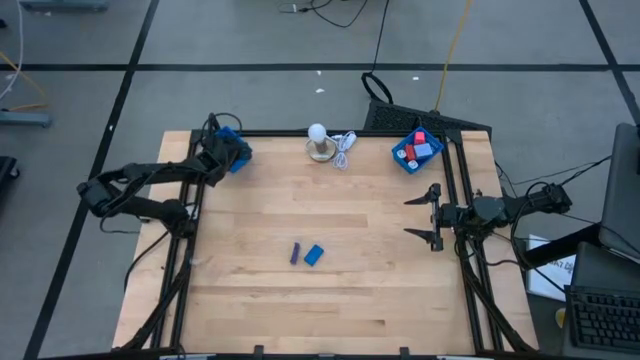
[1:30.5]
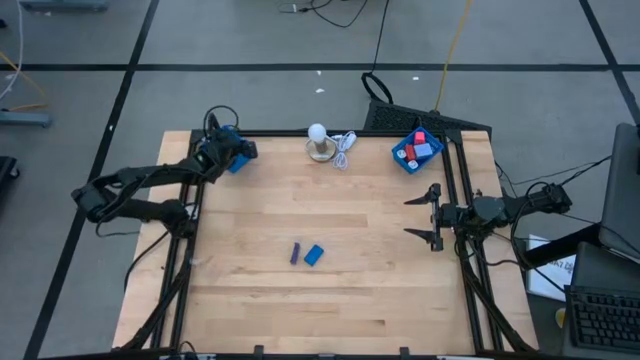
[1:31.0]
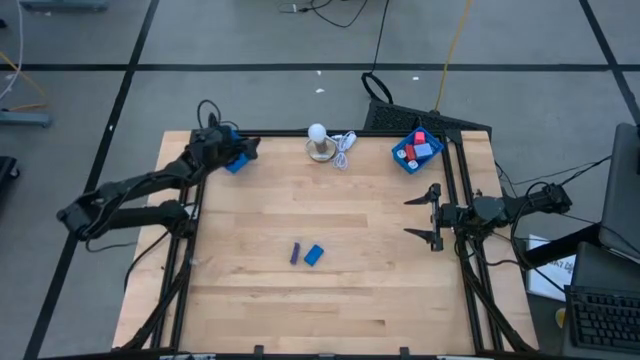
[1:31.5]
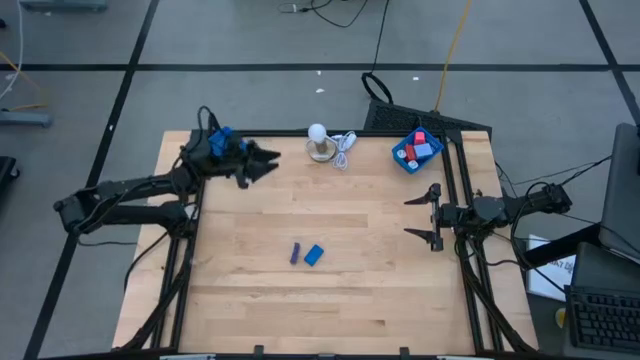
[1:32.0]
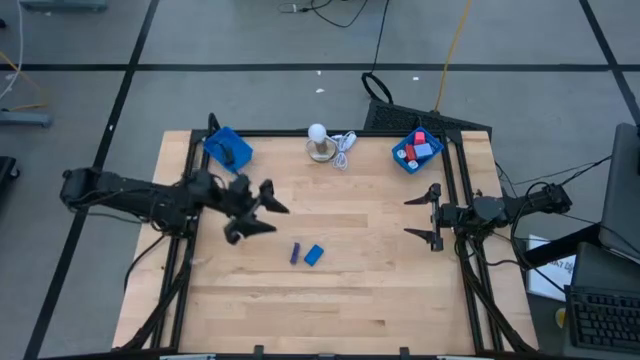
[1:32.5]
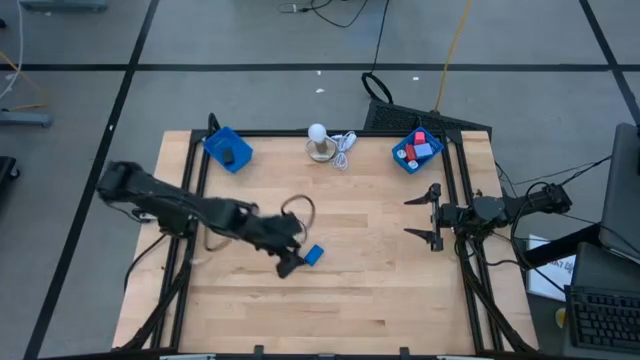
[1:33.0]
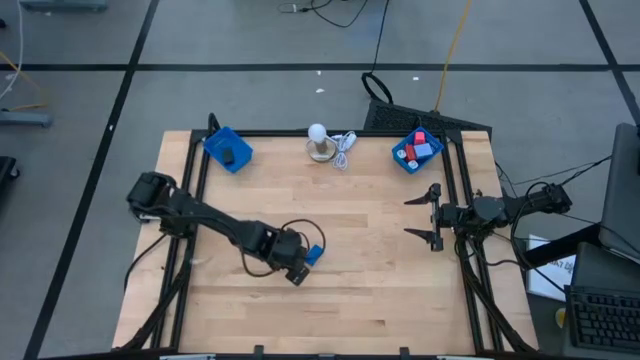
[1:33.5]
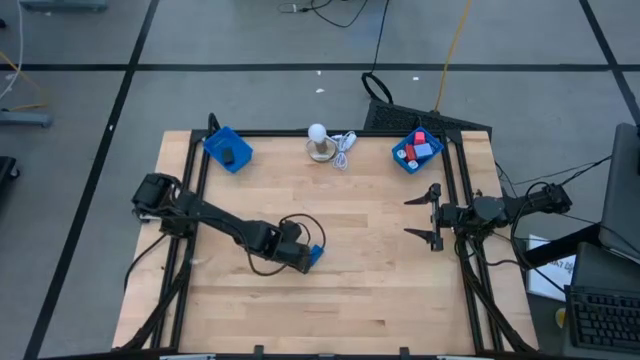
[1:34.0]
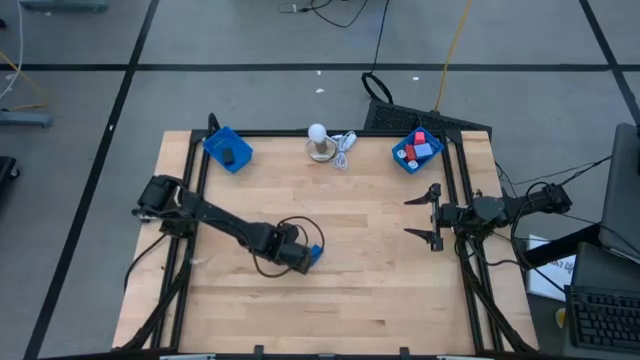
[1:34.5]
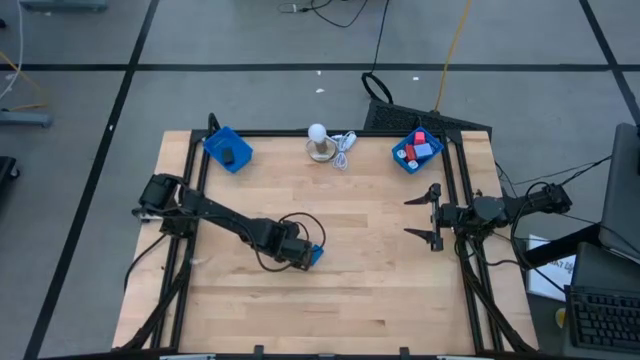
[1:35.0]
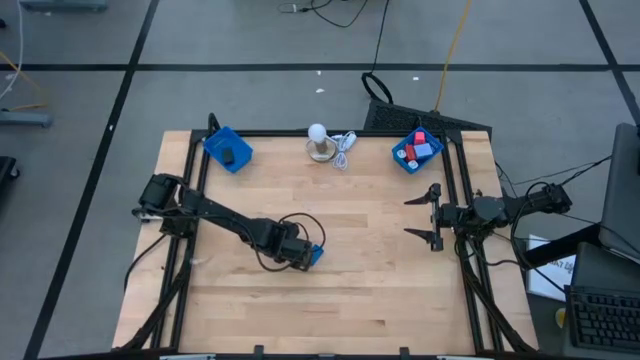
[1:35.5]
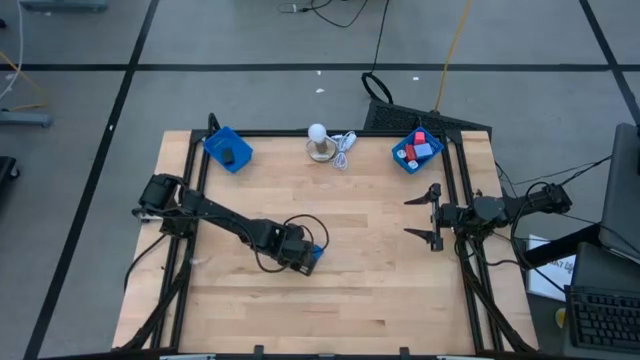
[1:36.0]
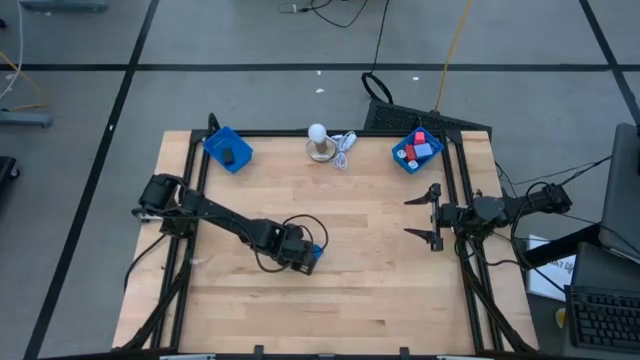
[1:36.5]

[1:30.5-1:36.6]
Task: Pick & Place Office items
Put the dark blue digital timer into the left blue bin

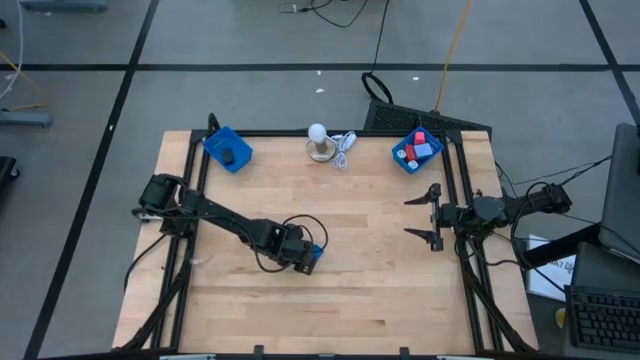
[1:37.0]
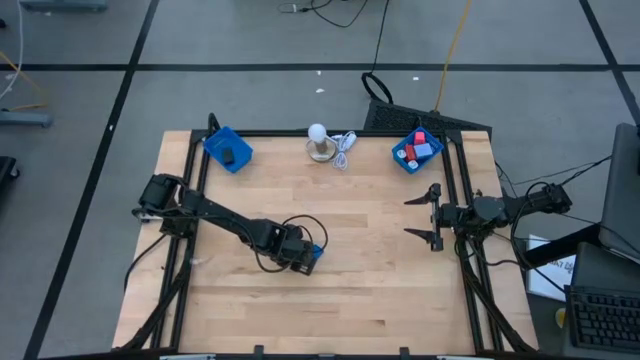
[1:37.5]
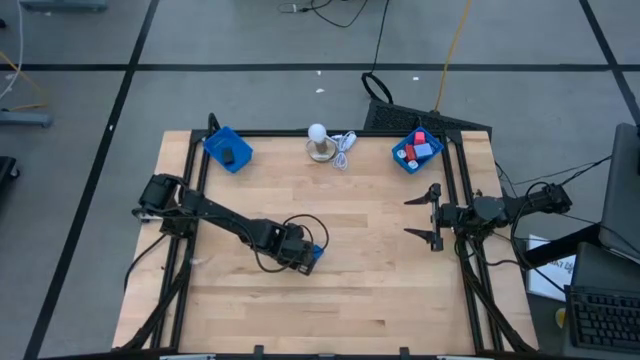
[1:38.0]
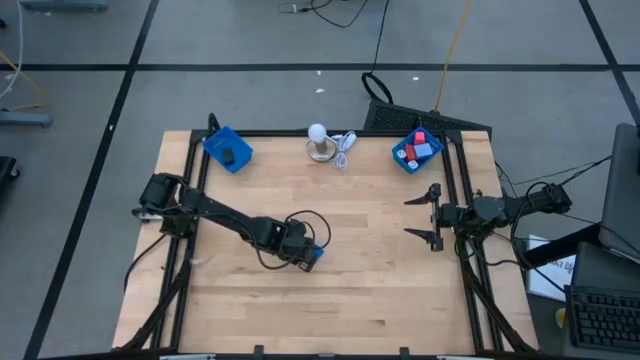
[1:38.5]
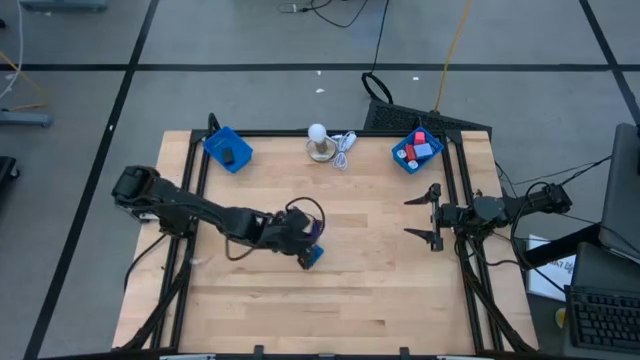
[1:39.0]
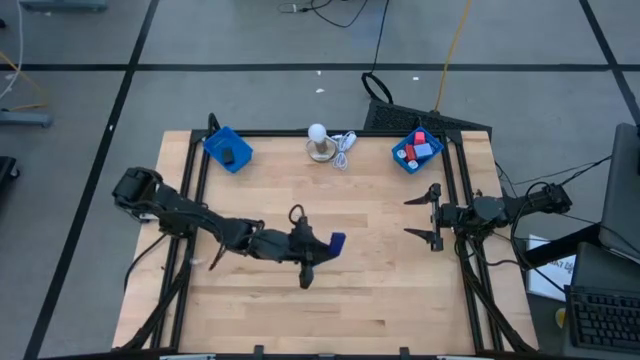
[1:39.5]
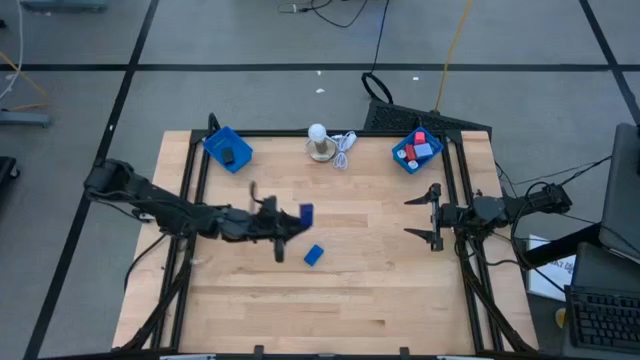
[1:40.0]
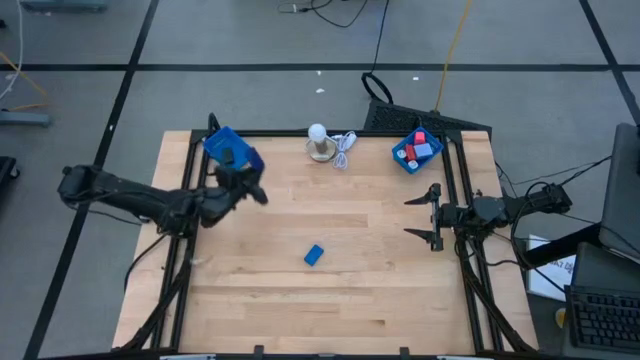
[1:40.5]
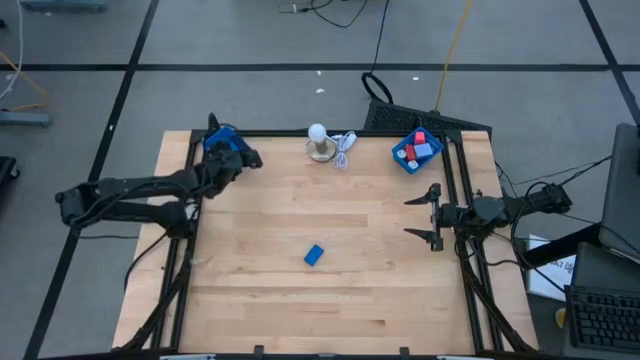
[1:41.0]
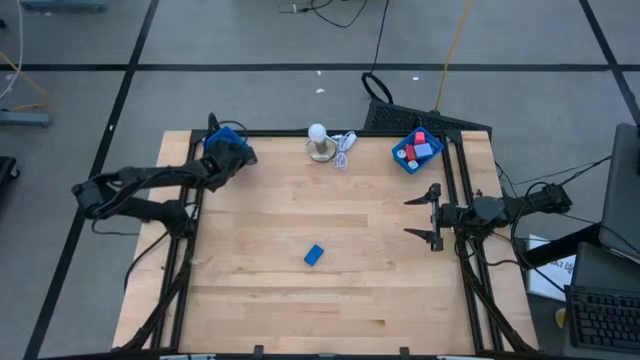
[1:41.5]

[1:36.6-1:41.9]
Put the dark blue digital timer into the left blue bin

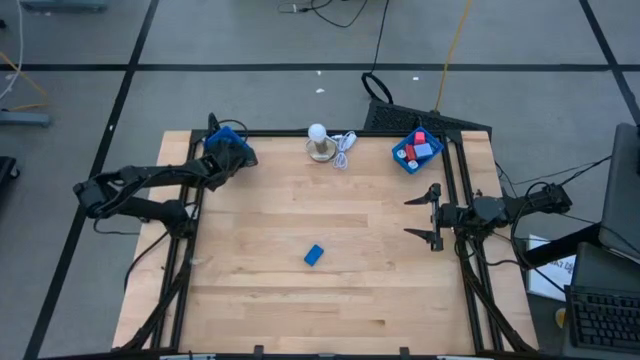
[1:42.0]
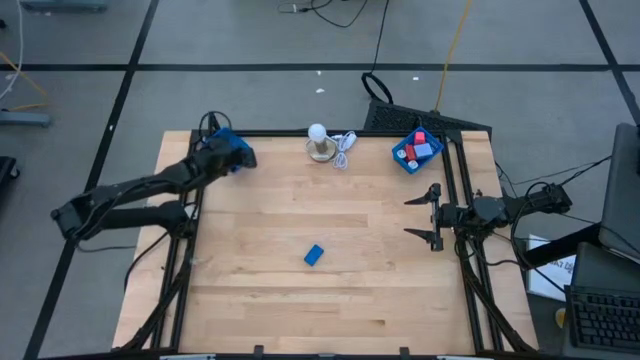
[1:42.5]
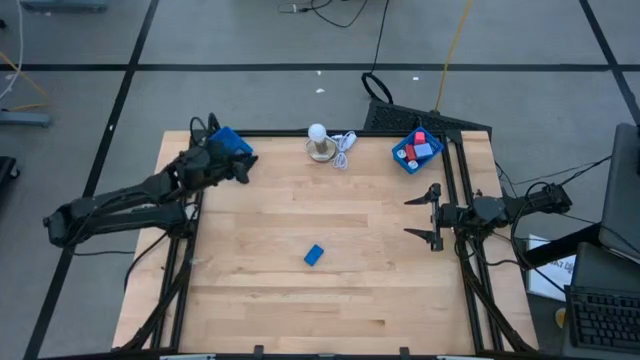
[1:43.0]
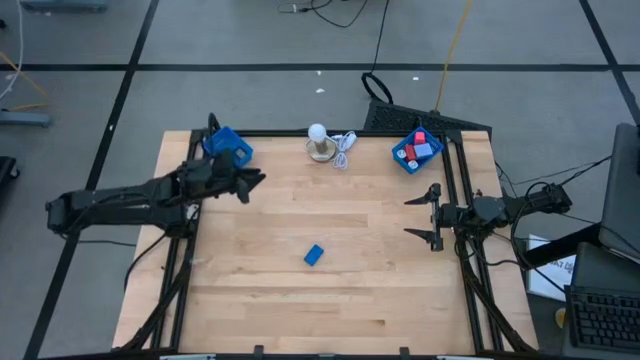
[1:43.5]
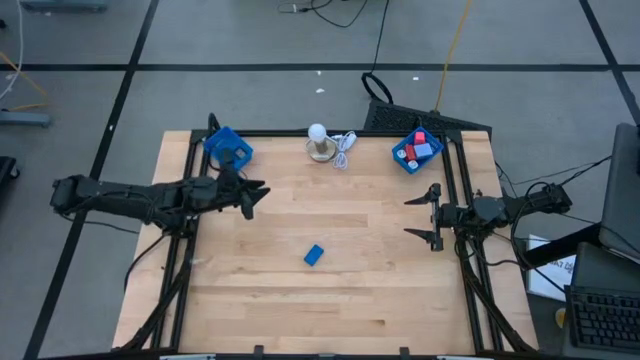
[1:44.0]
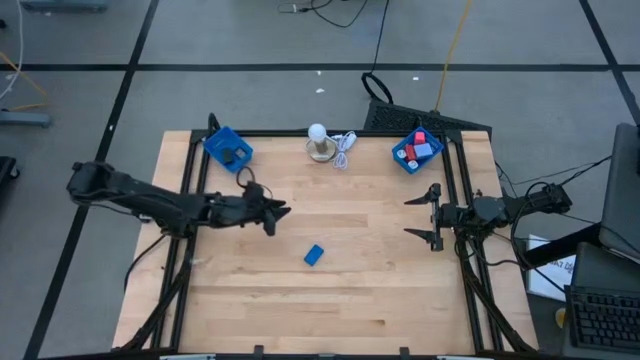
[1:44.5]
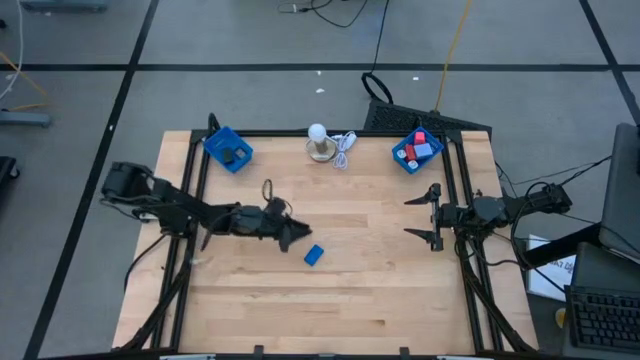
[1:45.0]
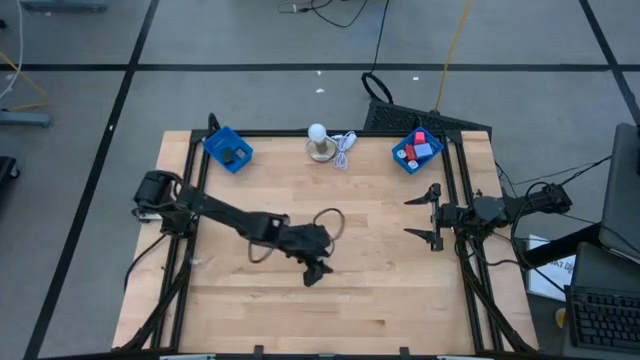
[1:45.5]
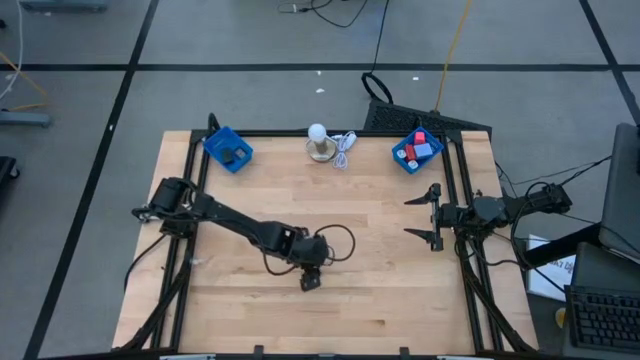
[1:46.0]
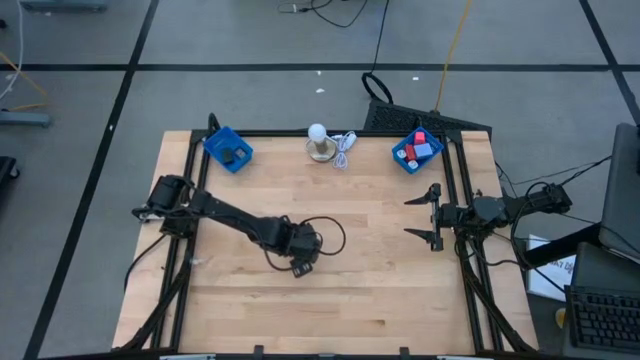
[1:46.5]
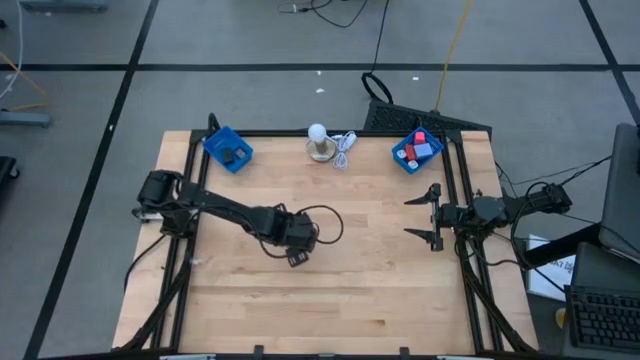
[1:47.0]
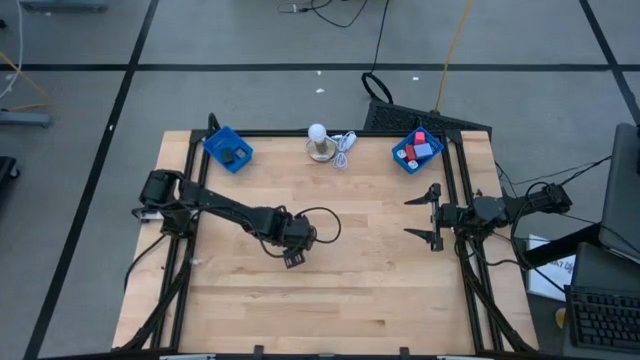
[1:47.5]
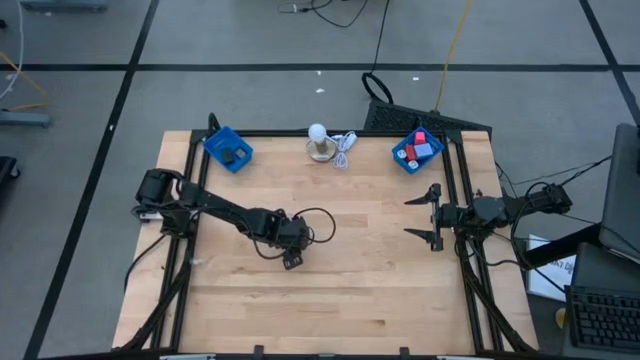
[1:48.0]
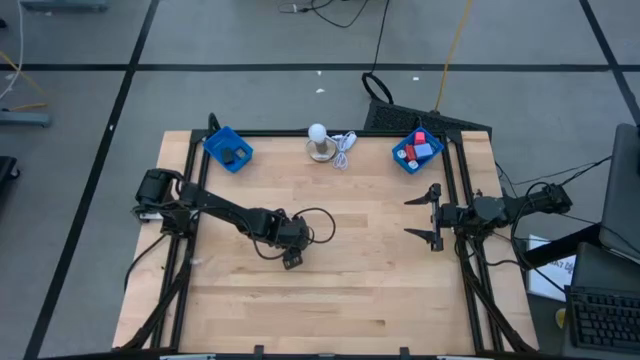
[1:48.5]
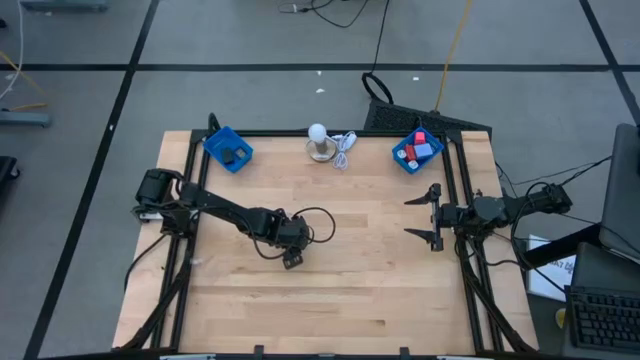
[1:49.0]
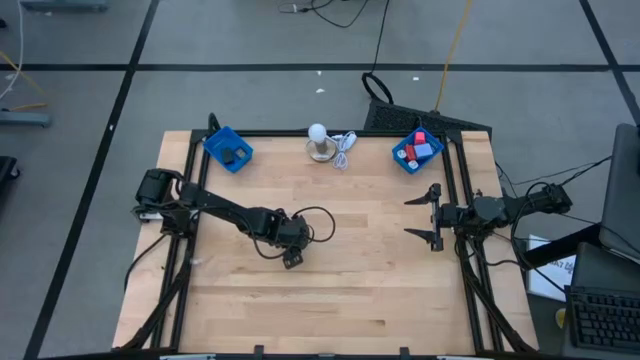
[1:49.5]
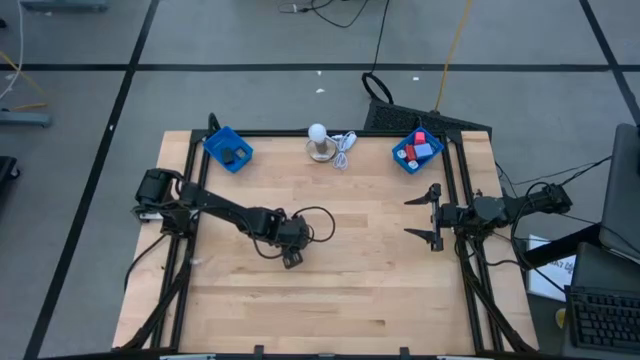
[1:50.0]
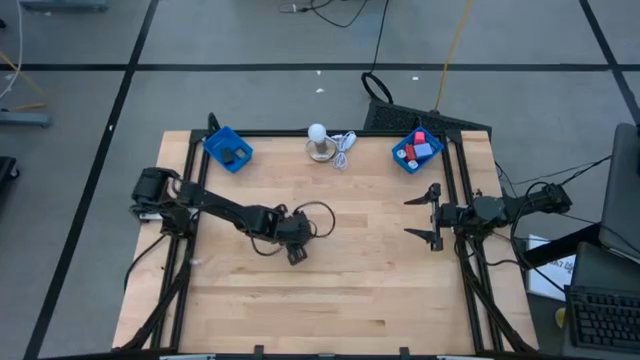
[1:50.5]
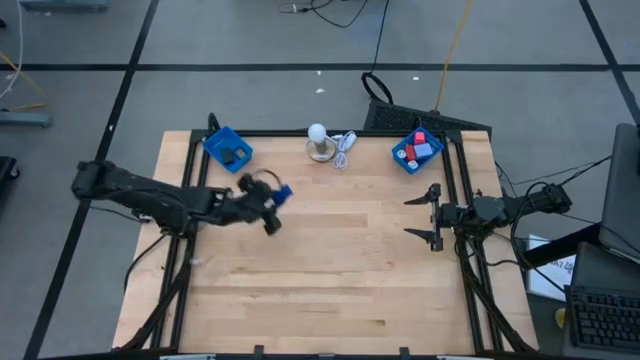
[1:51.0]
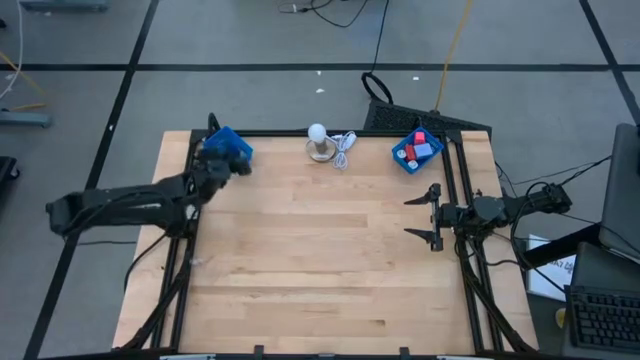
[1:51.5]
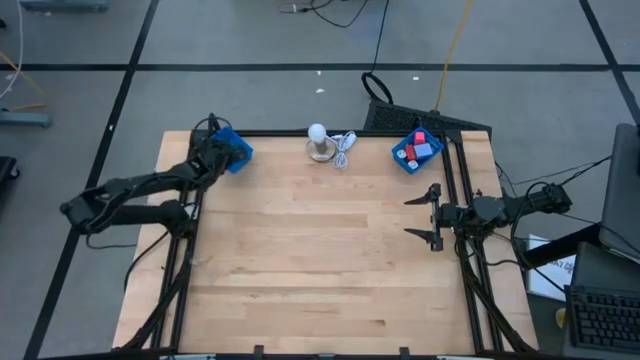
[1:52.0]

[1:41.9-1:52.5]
Put the blue digital timer into the left blue bin
